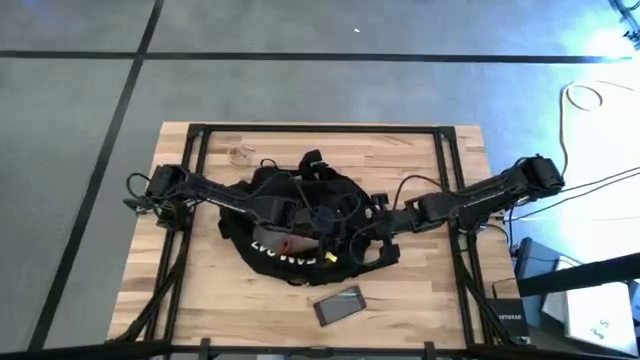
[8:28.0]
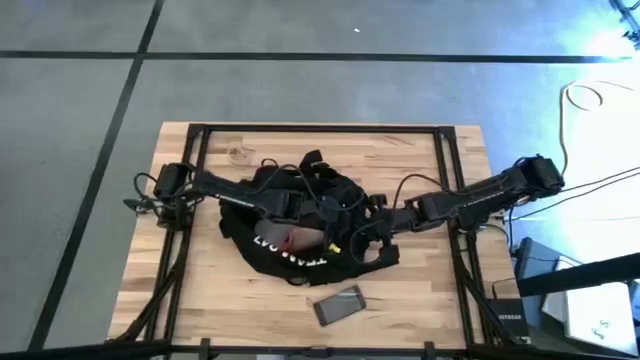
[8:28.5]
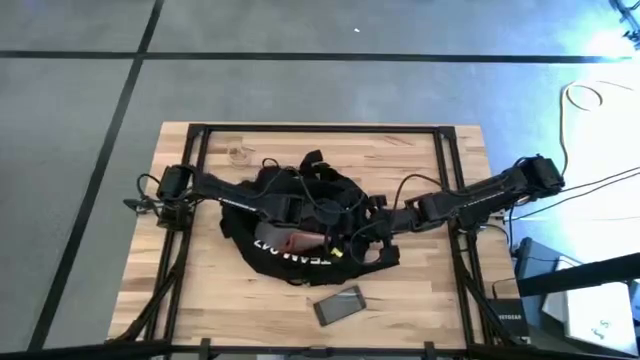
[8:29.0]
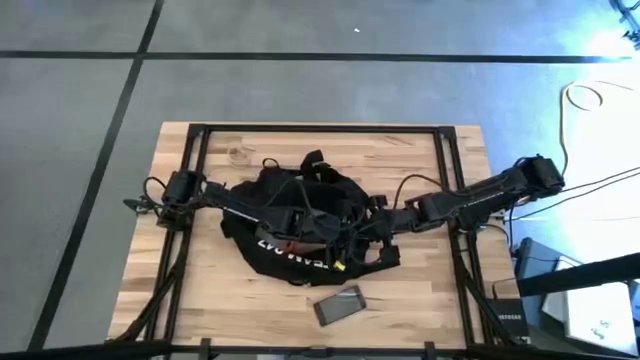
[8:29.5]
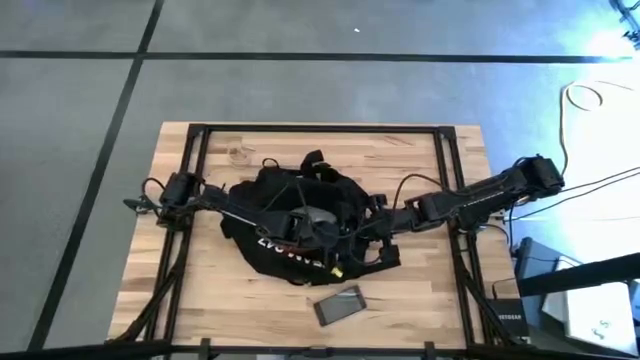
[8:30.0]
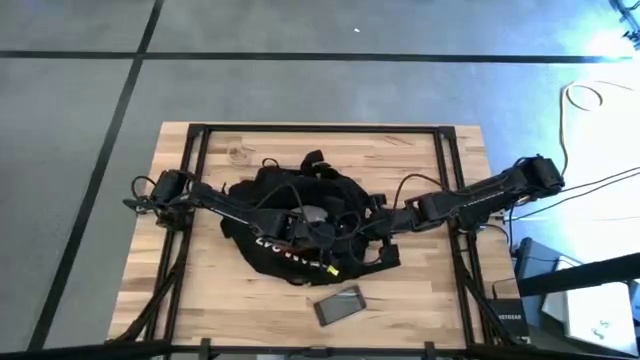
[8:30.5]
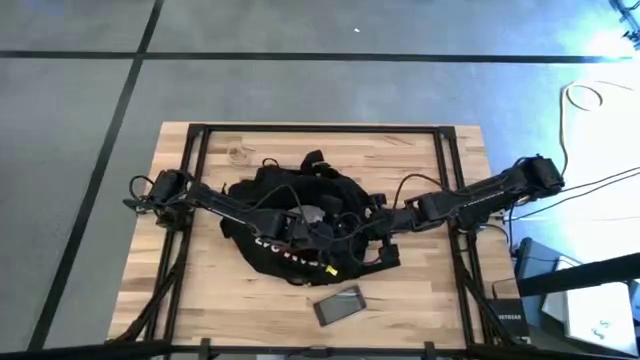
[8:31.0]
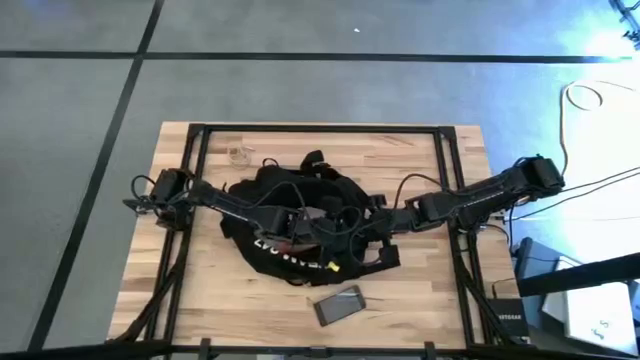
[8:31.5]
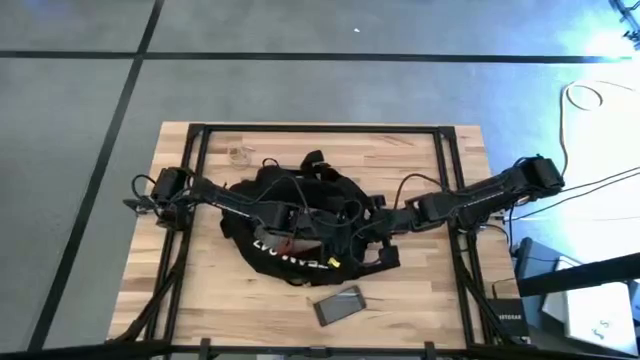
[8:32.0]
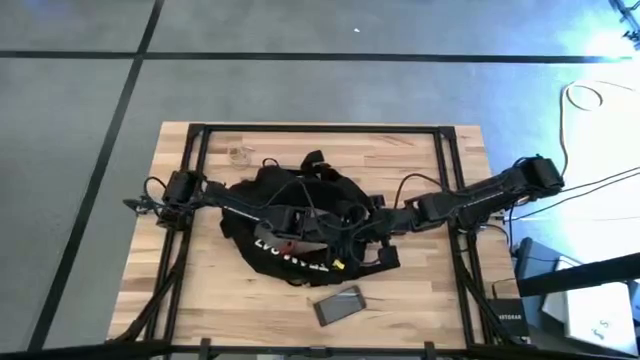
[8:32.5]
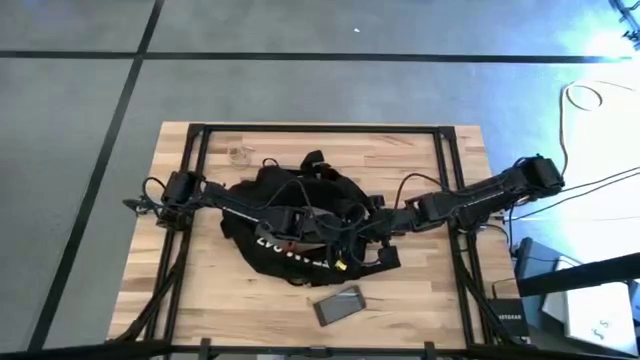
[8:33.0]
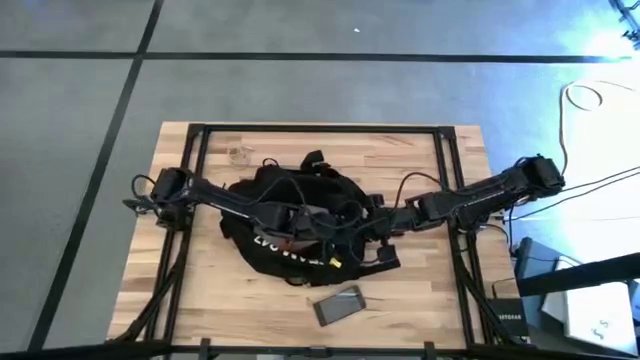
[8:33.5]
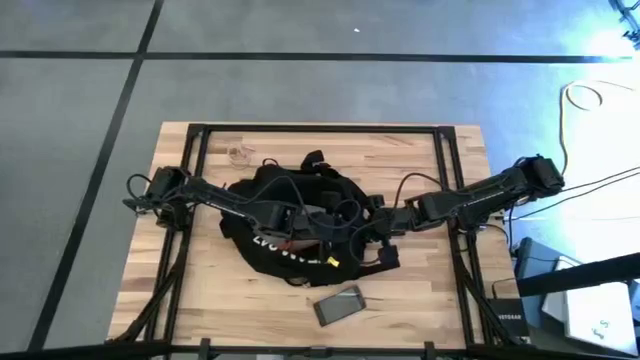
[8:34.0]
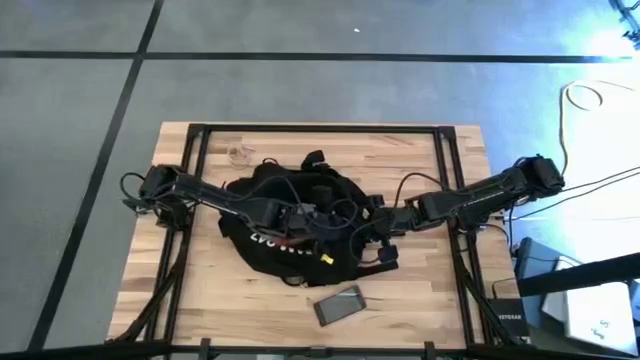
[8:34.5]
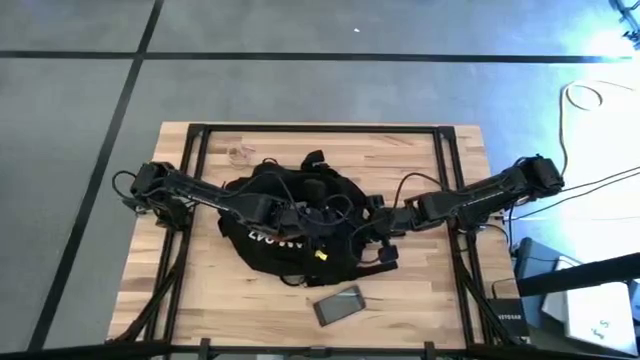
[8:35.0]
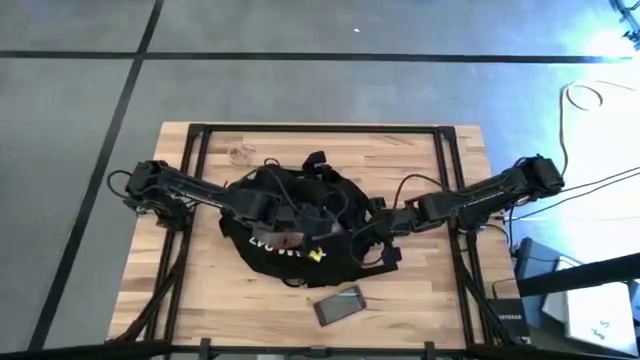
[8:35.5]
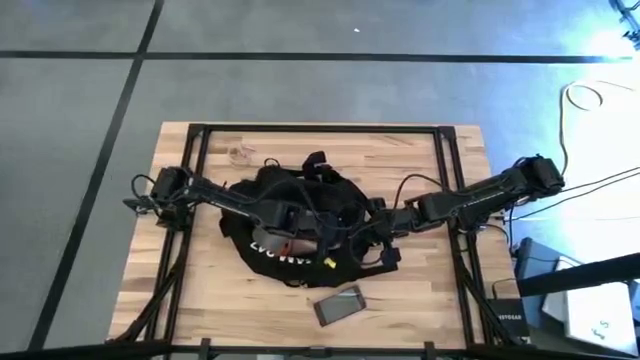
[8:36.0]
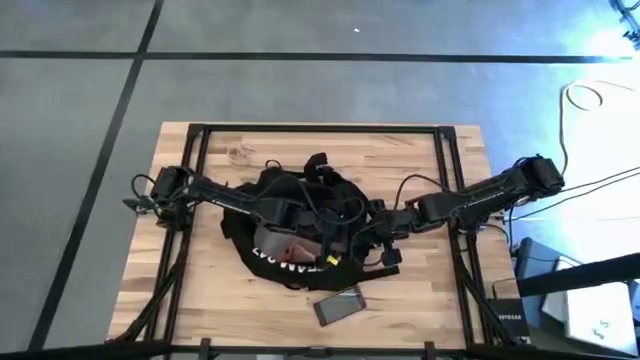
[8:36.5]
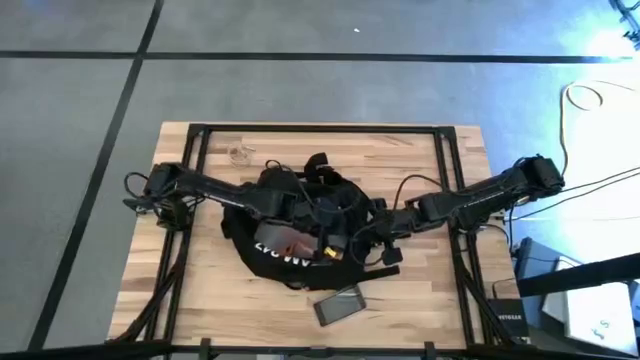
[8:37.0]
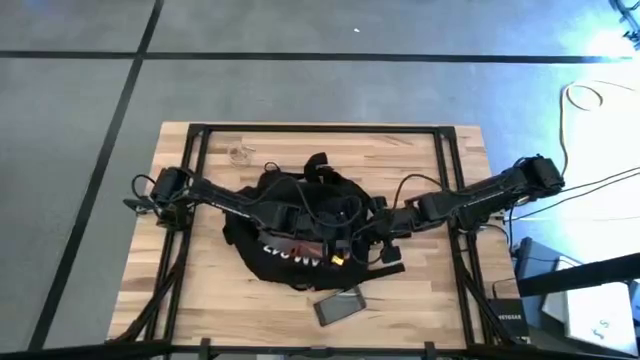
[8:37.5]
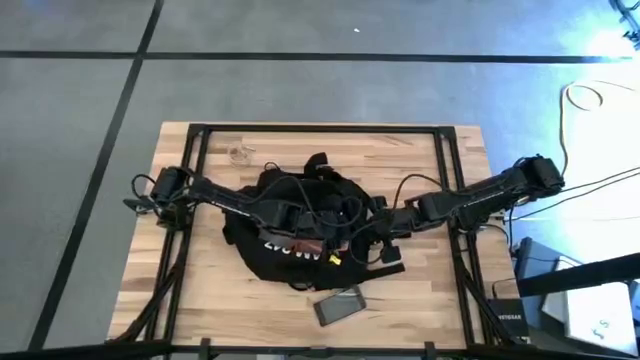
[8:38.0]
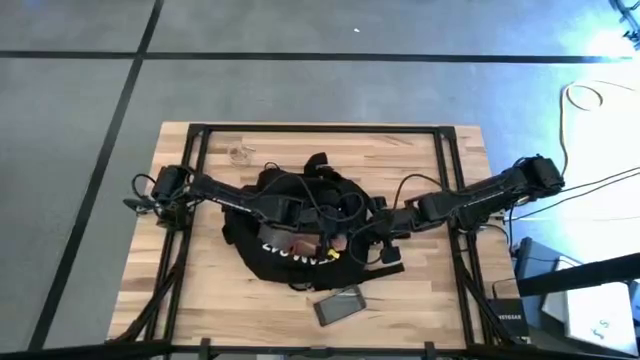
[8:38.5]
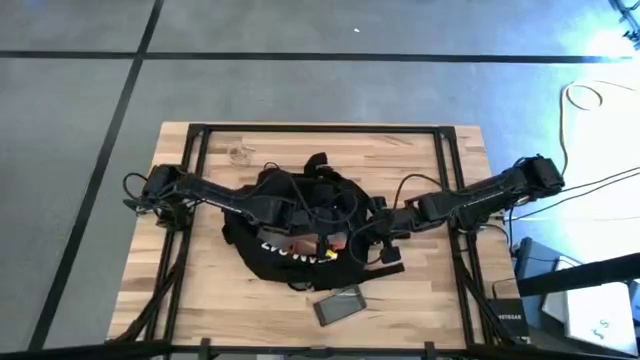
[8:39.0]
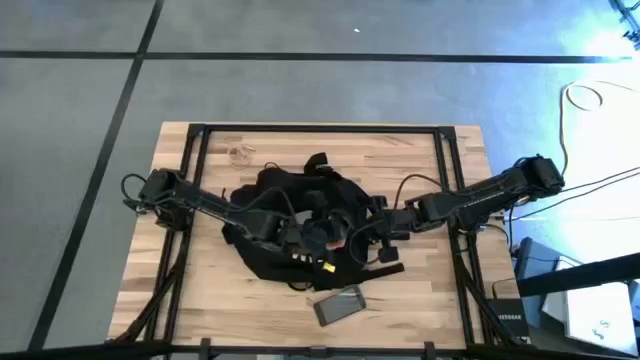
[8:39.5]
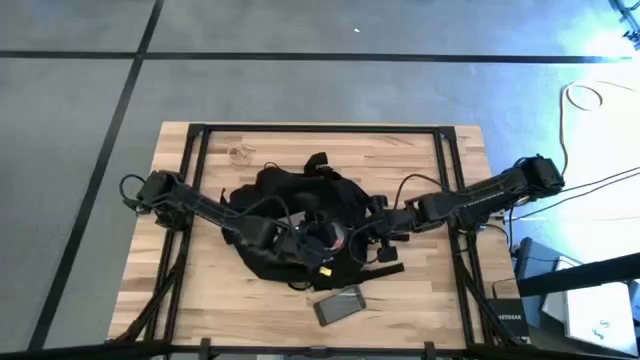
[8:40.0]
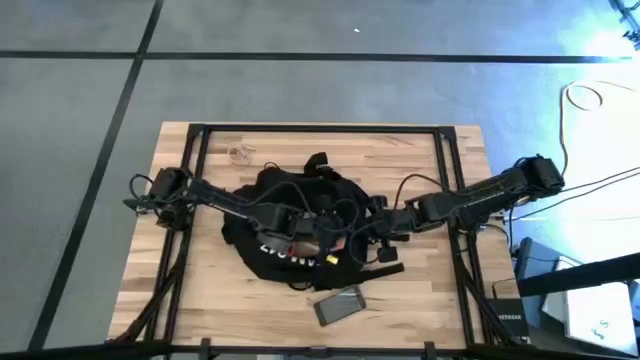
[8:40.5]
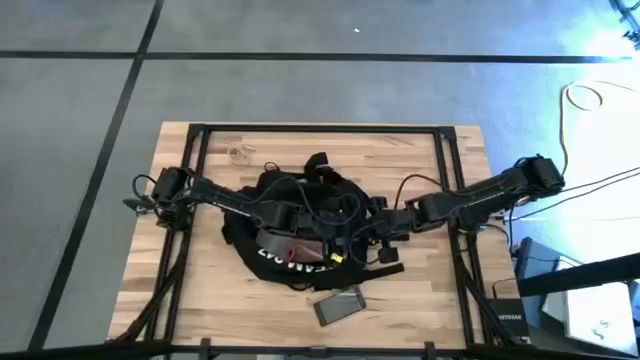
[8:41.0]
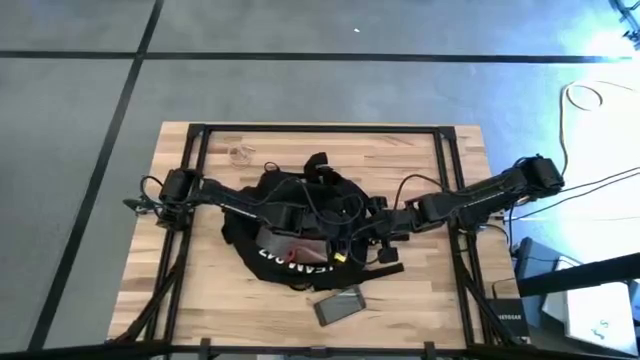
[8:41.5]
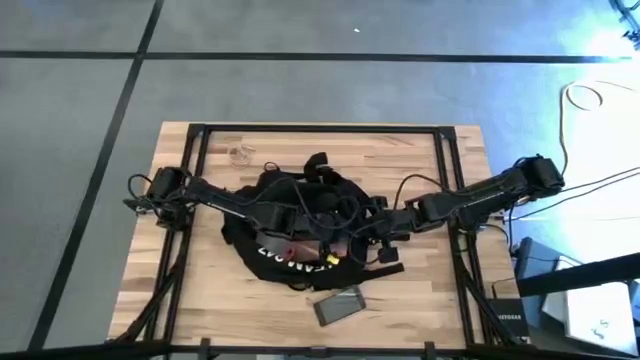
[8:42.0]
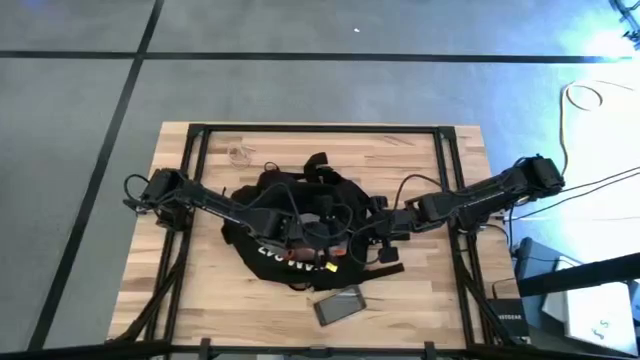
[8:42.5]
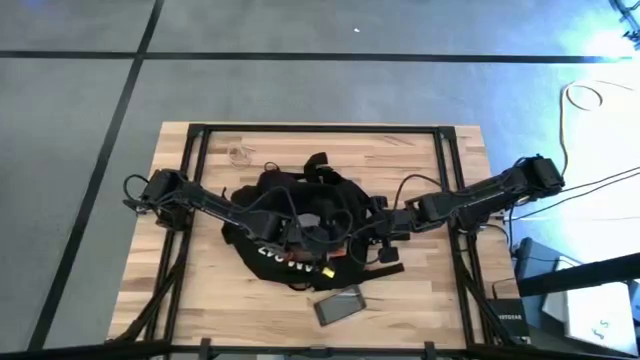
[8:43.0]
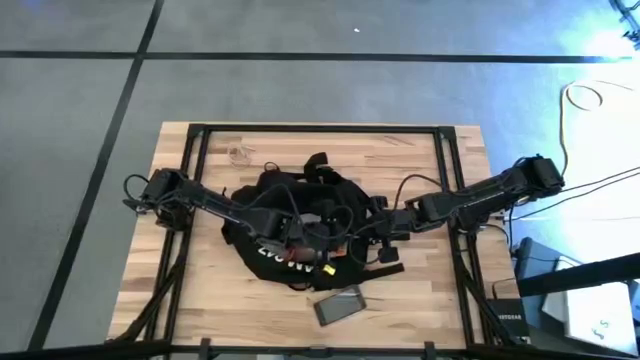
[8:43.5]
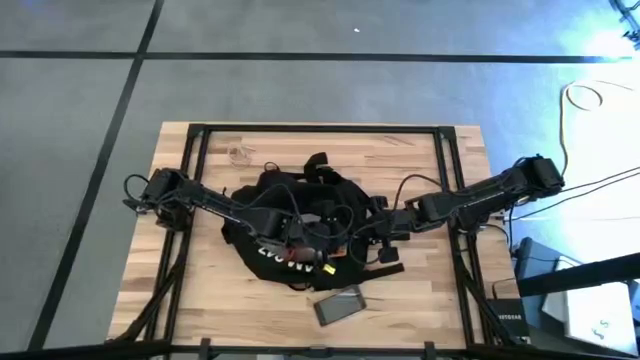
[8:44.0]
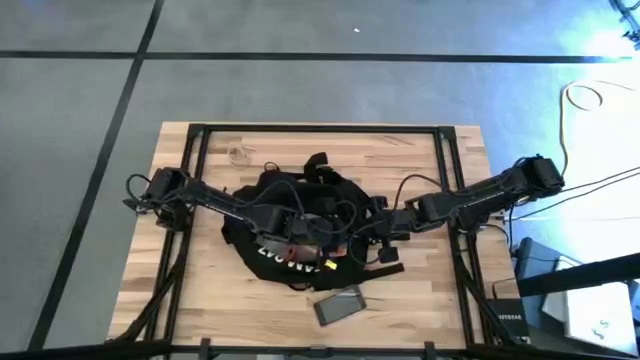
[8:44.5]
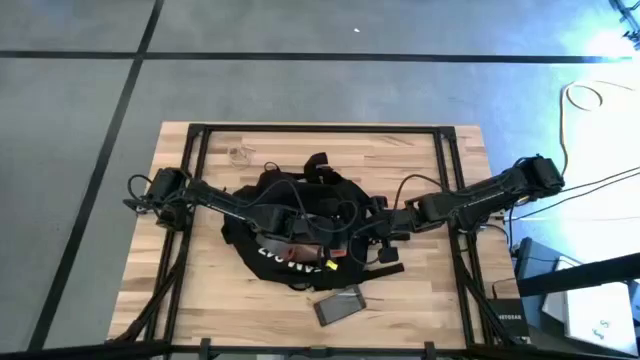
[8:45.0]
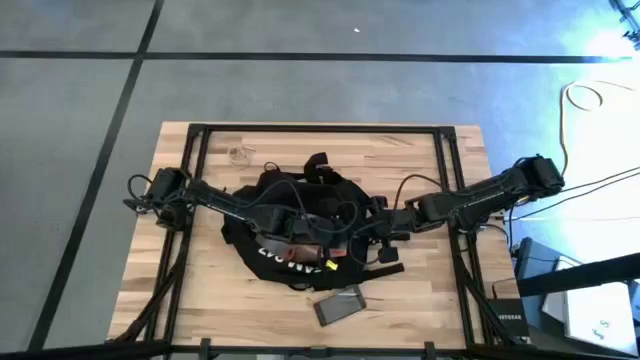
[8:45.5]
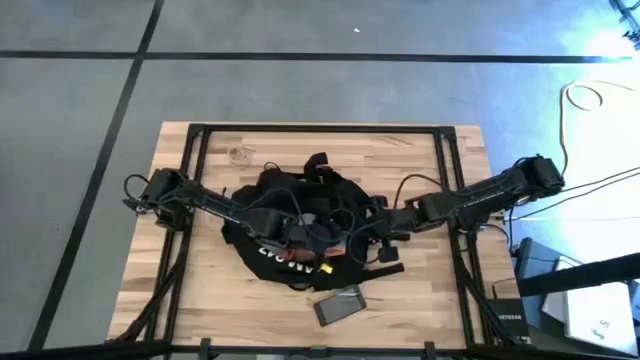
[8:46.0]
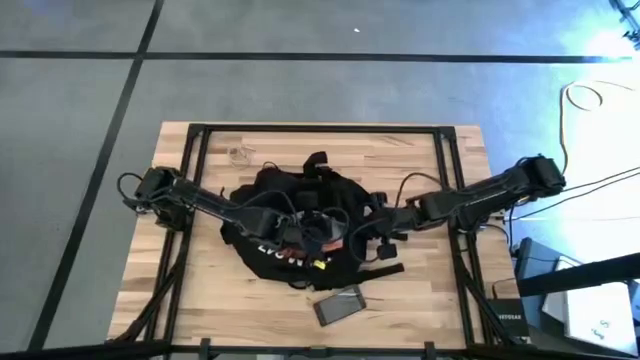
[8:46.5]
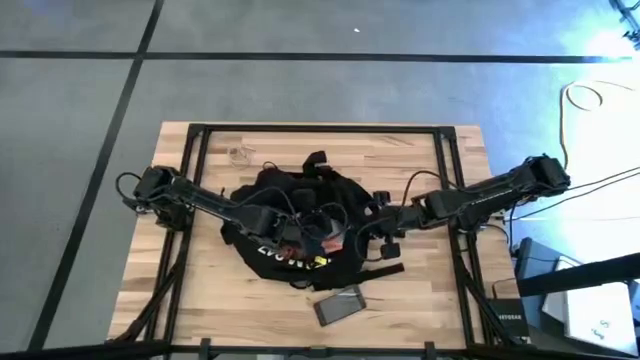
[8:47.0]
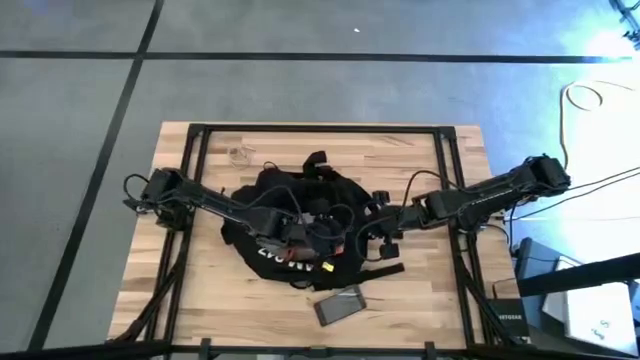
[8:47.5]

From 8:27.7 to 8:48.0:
Task: Unpack backpack
Close the black backpack

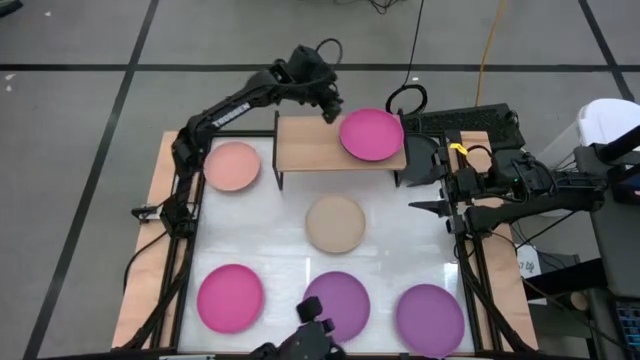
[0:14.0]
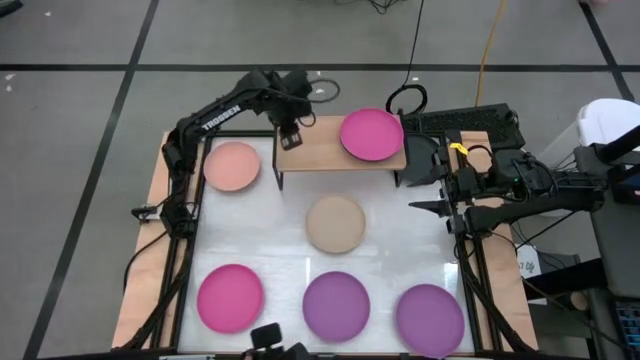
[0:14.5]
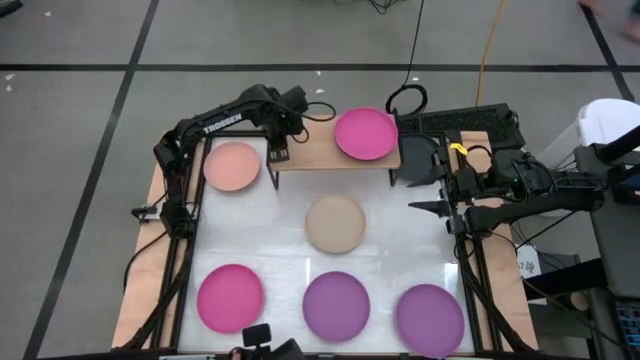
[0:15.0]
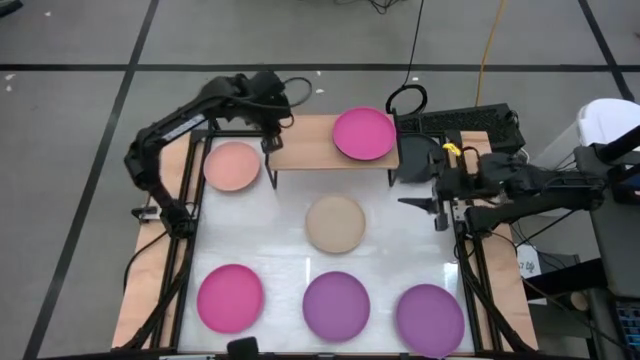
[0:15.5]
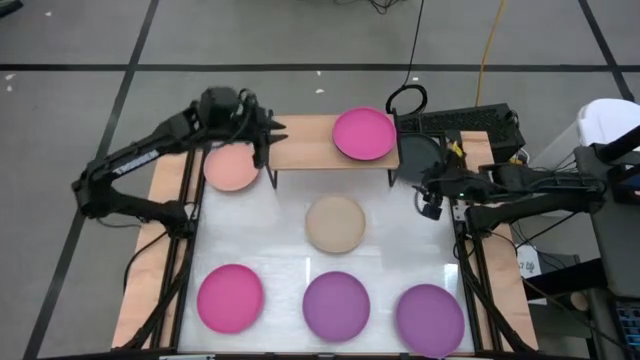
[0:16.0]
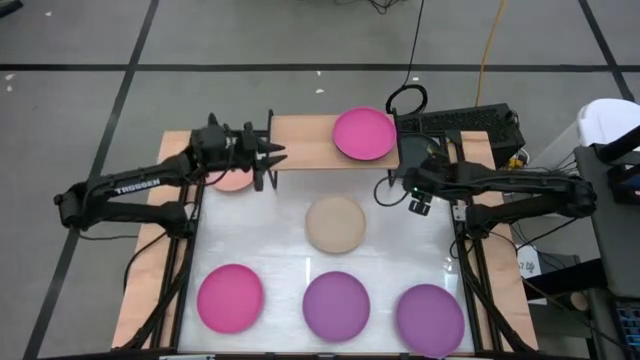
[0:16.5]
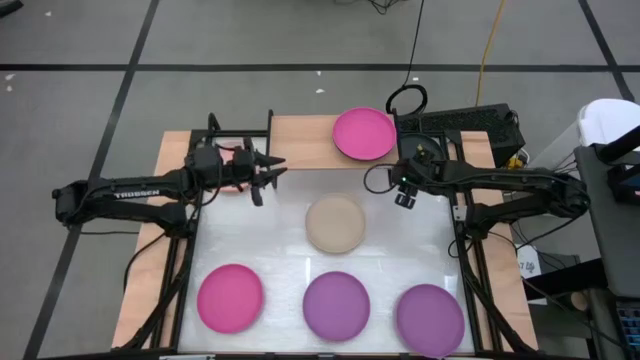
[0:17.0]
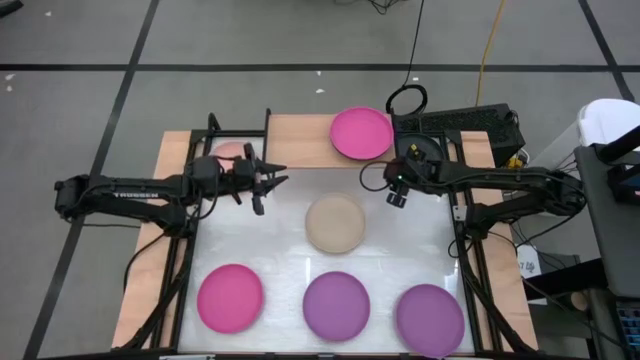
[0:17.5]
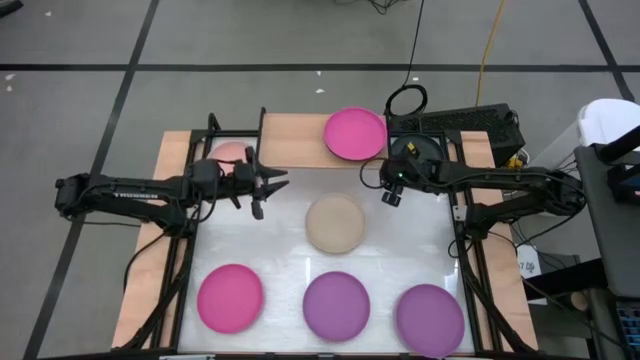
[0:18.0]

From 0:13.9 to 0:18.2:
Task: Place and stack plates onto a shelf
Adjust the shelf on the table
